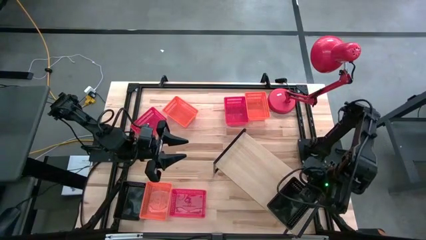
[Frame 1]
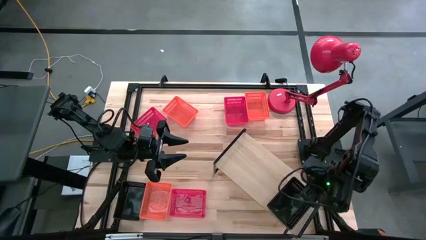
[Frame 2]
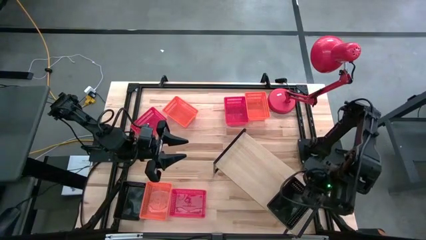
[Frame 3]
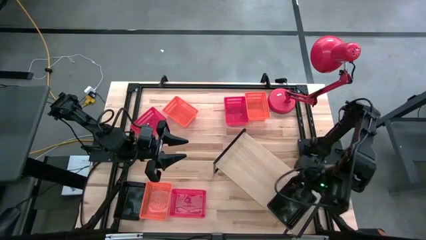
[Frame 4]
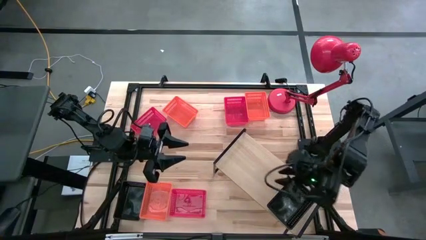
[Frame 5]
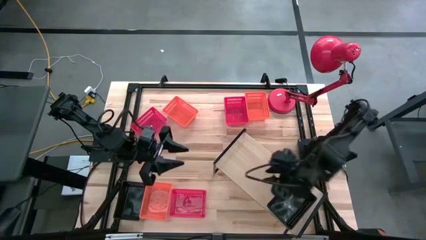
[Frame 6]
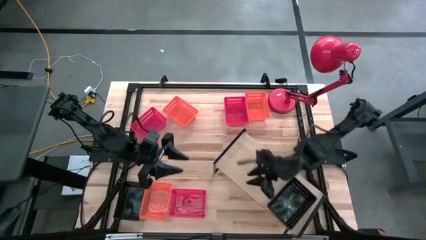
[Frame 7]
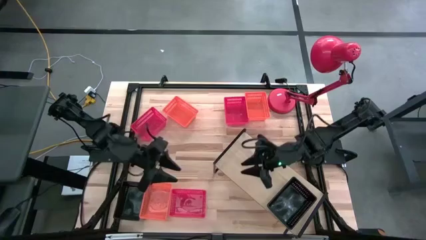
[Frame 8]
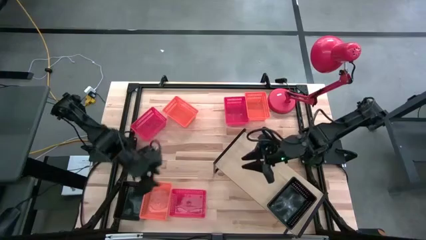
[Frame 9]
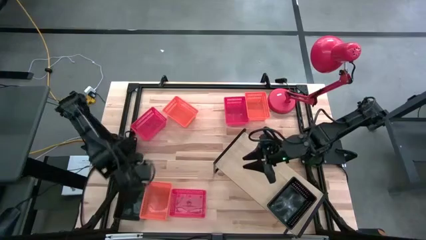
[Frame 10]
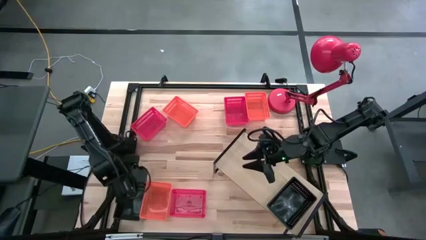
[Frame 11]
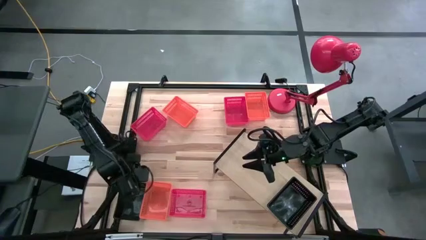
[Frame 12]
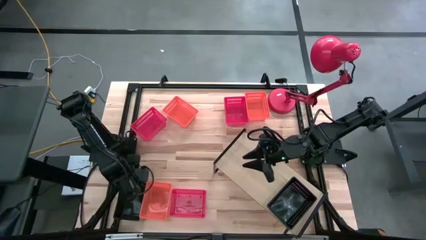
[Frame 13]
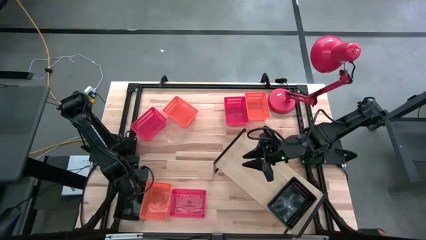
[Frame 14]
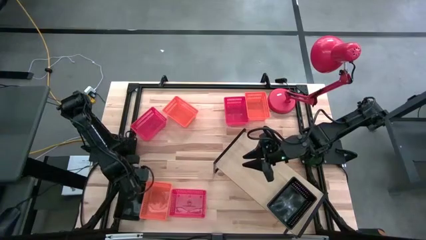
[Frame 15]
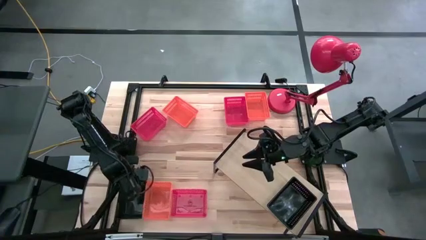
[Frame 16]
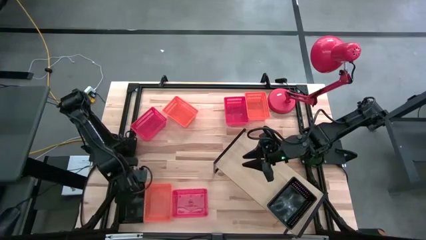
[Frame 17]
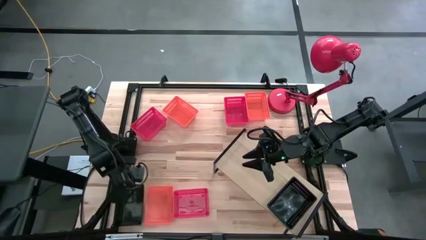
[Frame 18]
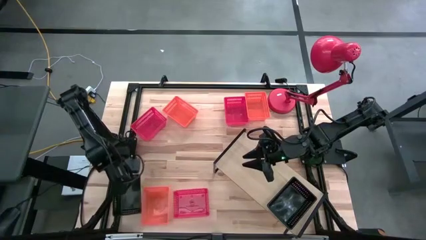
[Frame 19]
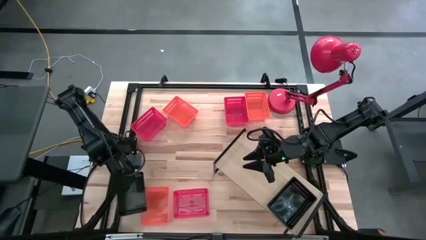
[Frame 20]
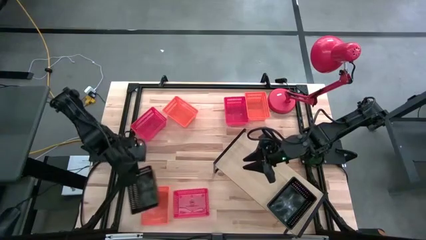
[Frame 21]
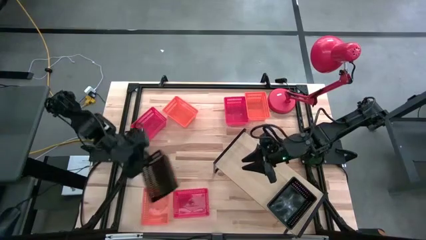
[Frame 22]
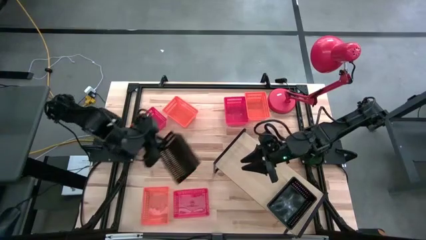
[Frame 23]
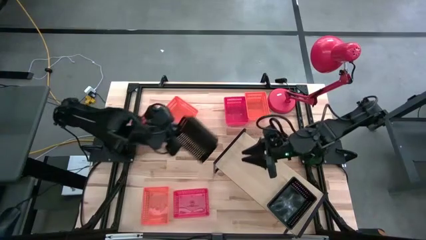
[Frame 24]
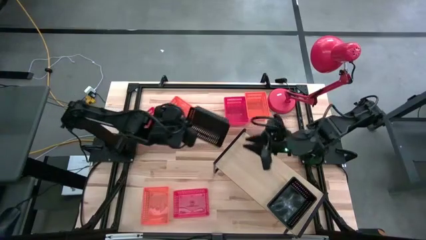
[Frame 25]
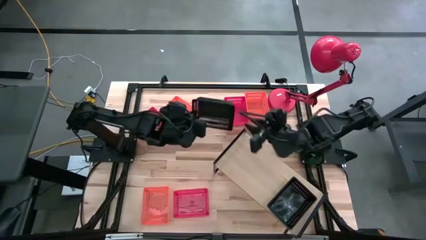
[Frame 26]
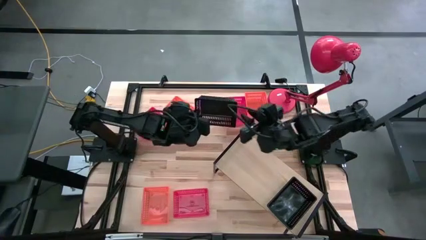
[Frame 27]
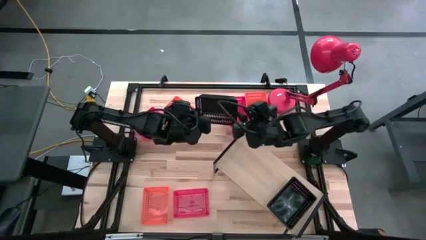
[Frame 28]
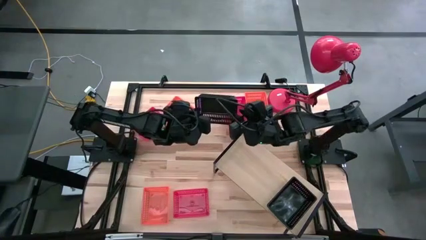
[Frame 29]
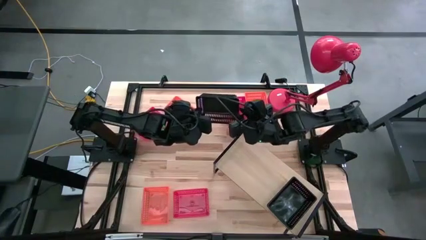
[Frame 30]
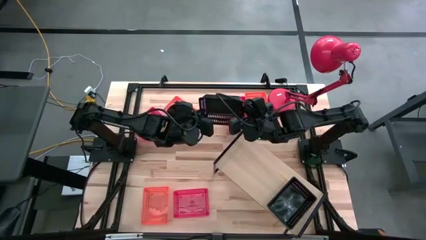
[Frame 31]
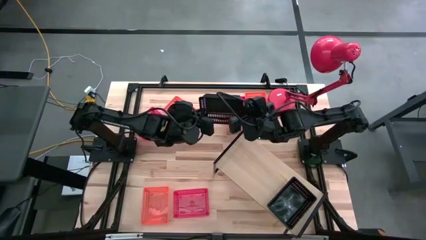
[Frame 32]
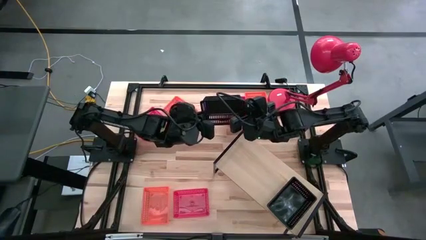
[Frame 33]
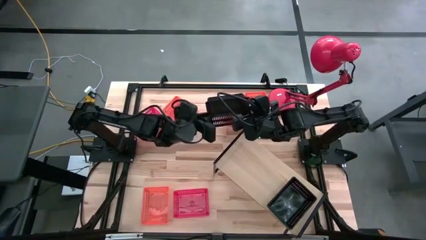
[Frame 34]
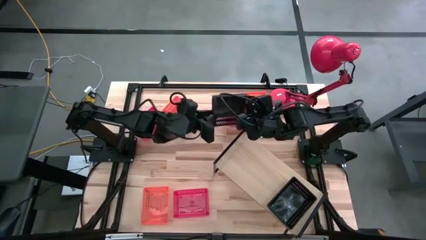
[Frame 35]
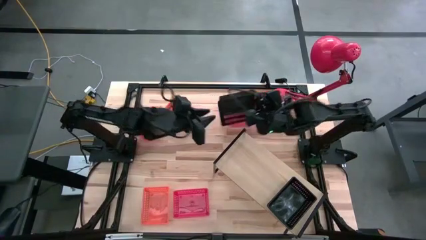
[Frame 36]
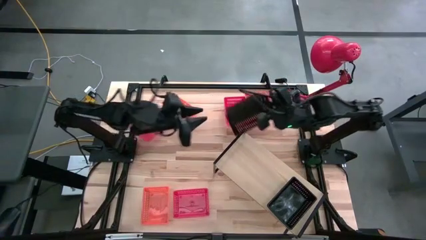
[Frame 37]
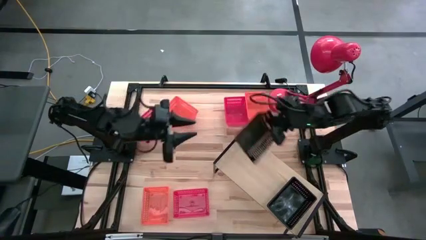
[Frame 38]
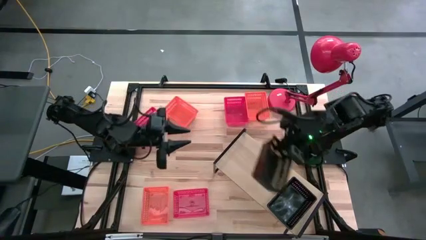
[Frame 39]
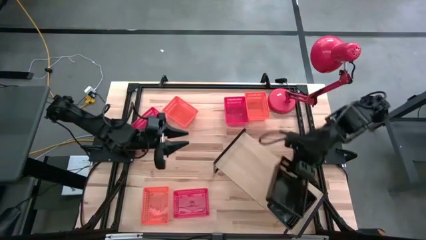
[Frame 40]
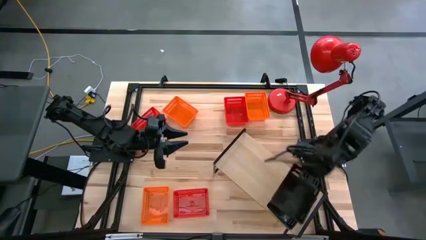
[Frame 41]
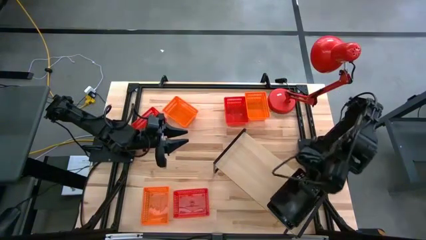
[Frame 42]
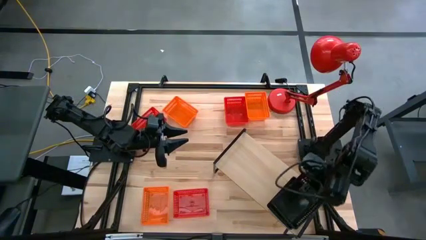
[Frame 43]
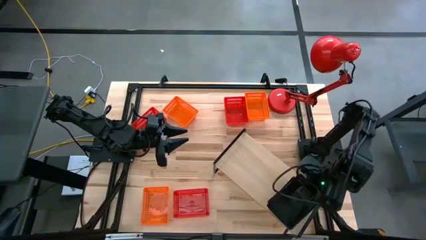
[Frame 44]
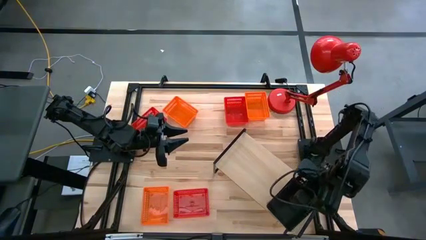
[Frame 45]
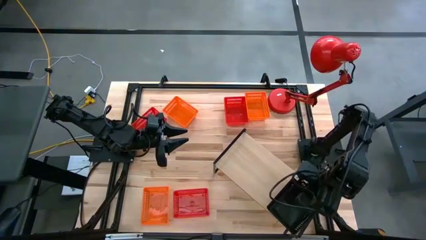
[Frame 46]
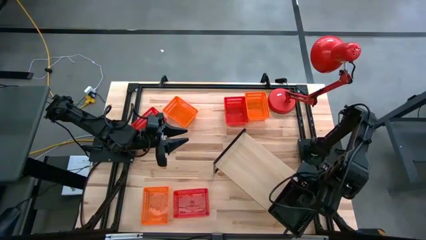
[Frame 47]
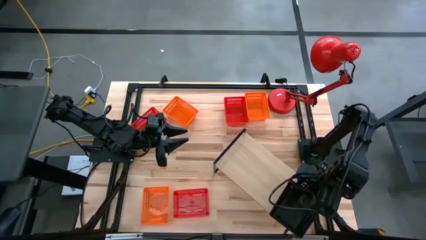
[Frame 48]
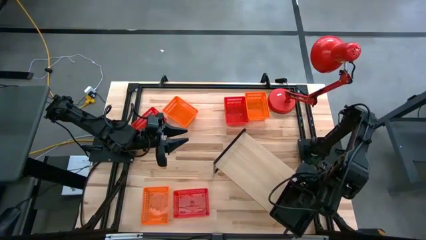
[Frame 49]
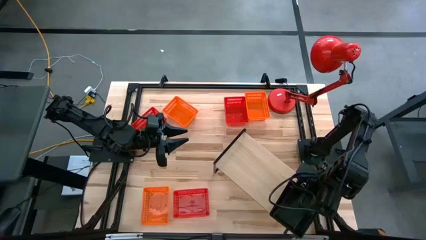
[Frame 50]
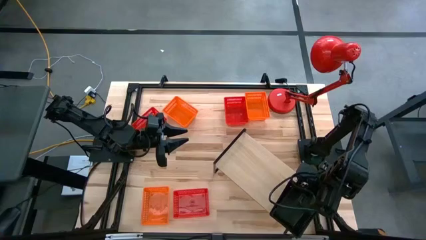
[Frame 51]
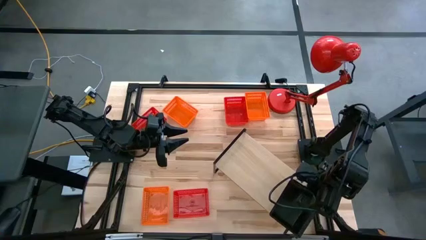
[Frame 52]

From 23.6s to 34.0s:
Task: Stack baskets on shelf by color
Stack the black bin on the black bins on the shelf
